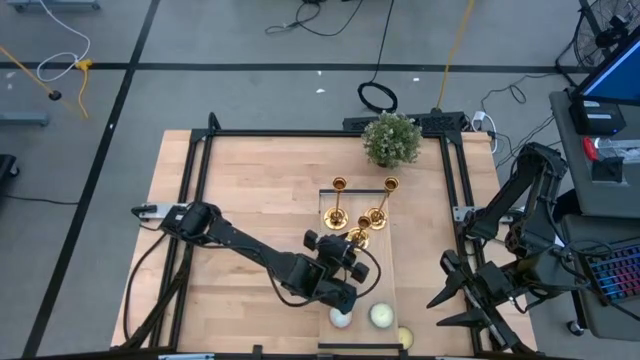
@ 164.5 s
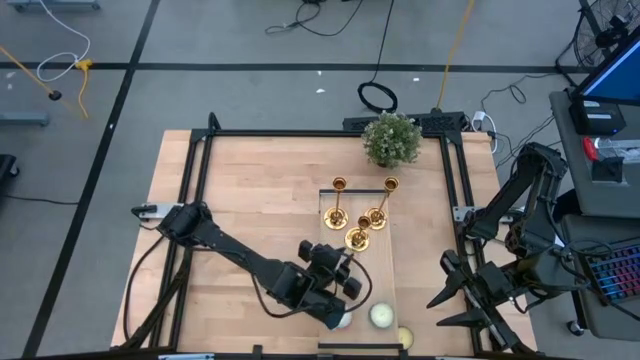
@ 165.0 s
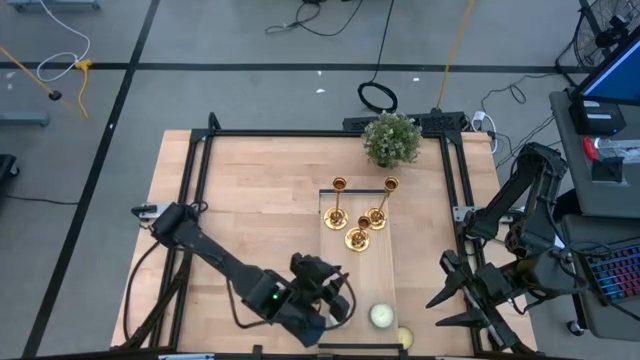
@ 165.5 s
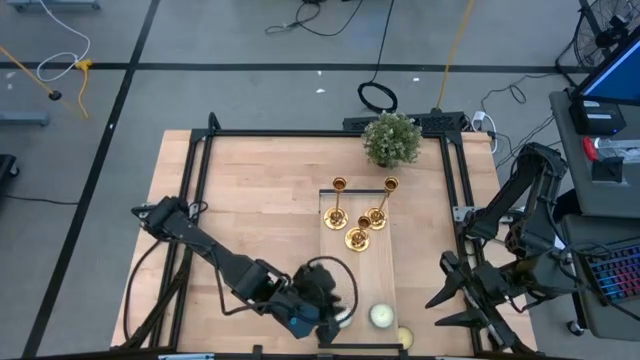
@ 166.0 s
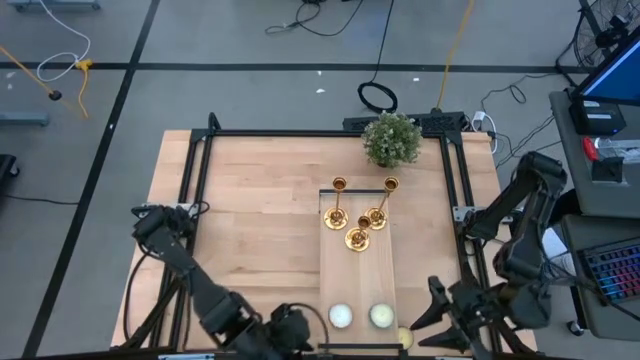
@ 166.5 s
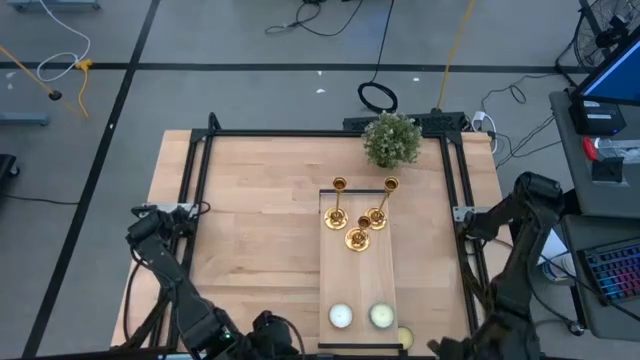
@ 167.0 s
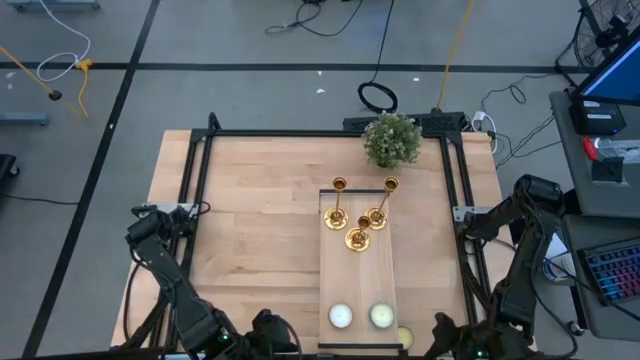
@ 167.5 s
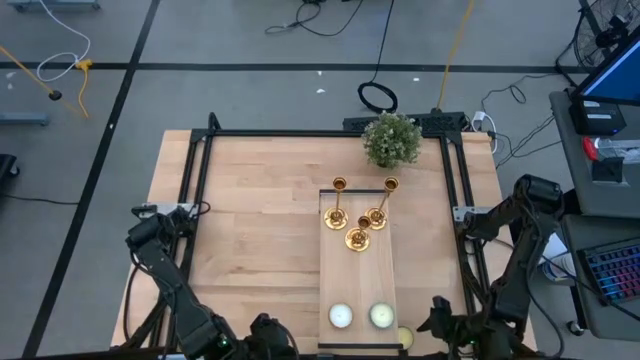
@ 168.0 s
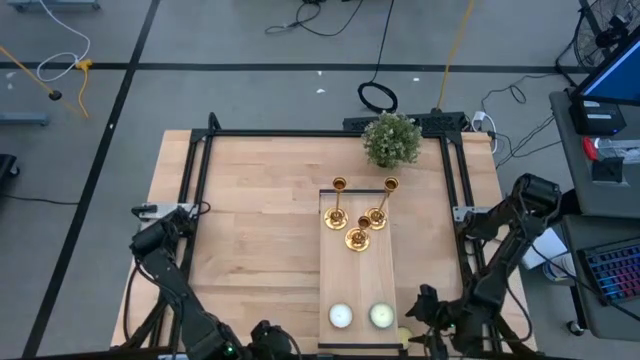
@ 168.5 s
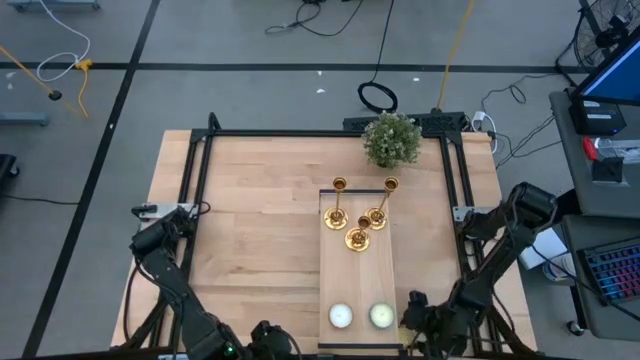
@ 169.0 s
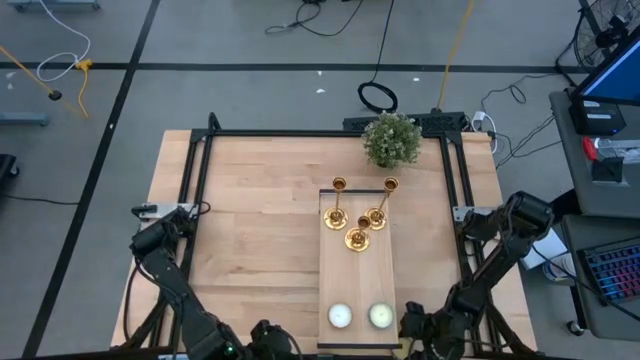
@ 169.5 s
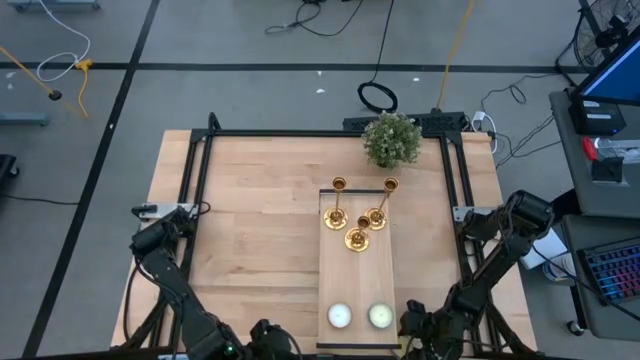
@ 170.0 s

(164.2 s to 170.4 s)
Task: Pick & Place candle stick holders
Put the red patterned scented candle on the shelf

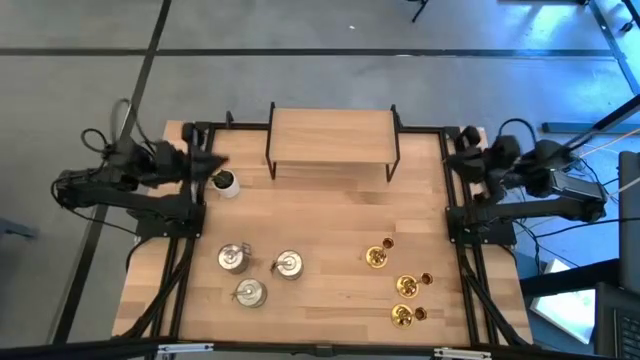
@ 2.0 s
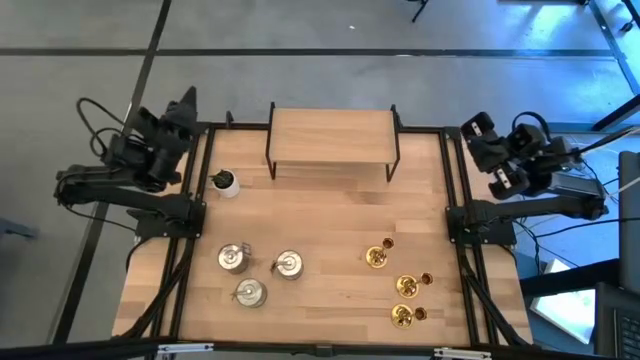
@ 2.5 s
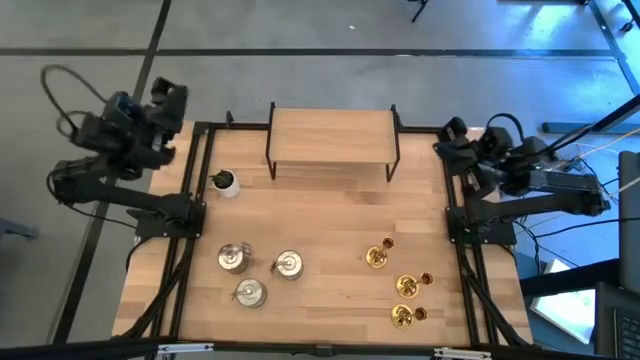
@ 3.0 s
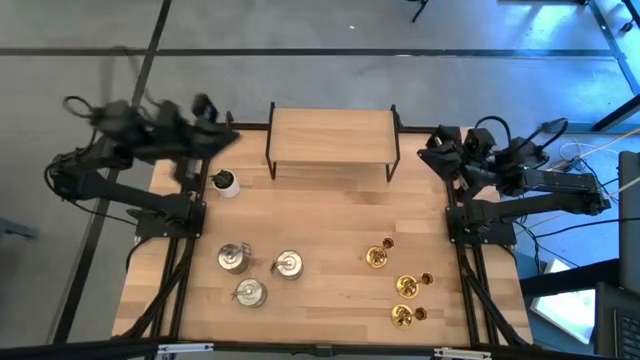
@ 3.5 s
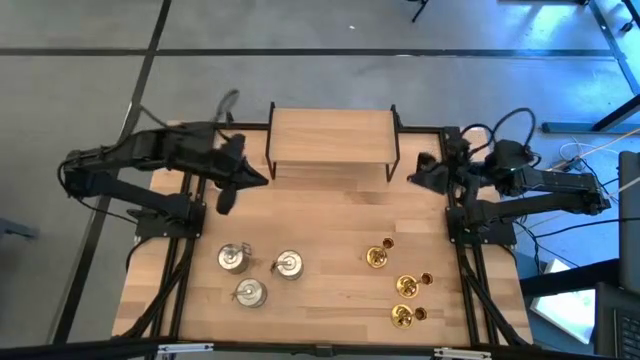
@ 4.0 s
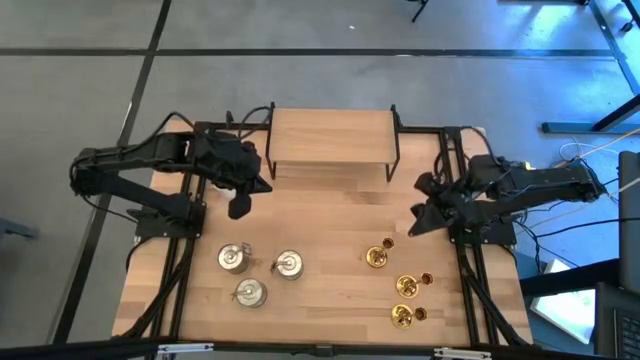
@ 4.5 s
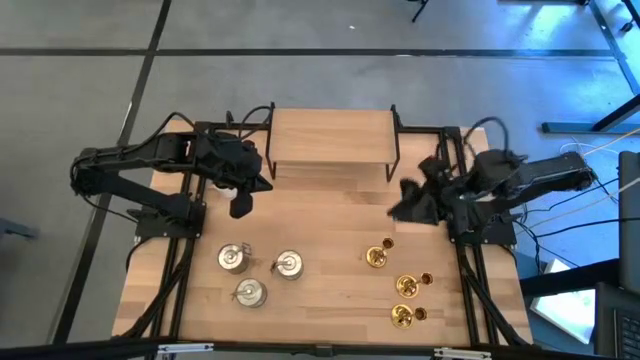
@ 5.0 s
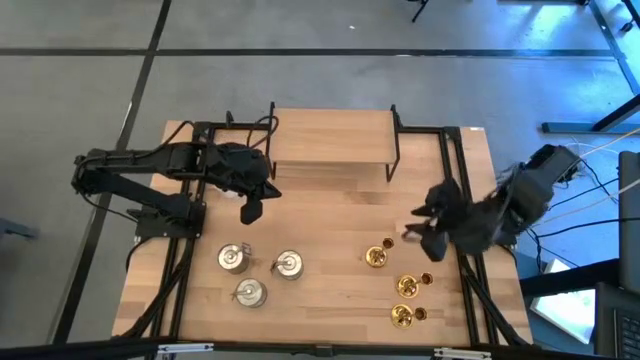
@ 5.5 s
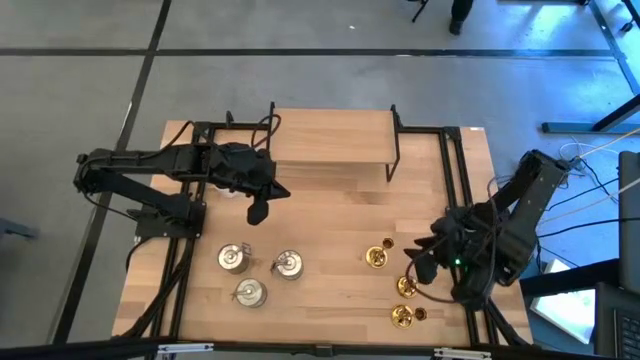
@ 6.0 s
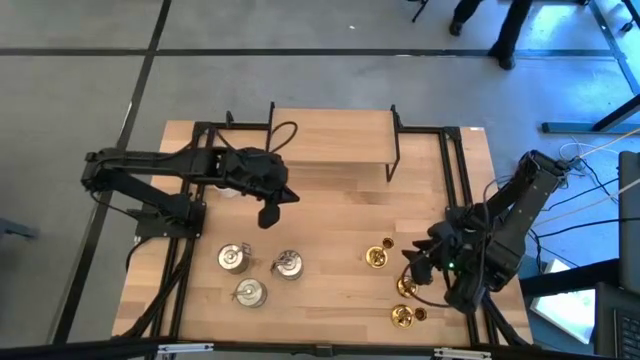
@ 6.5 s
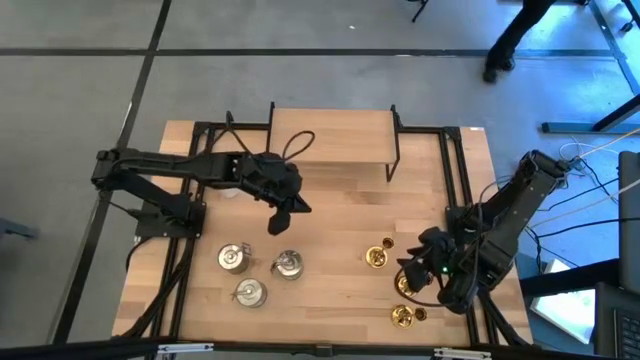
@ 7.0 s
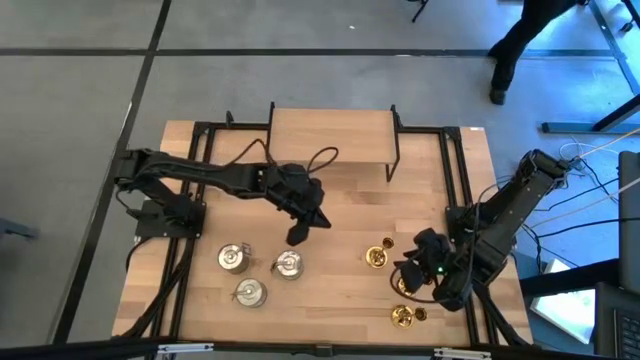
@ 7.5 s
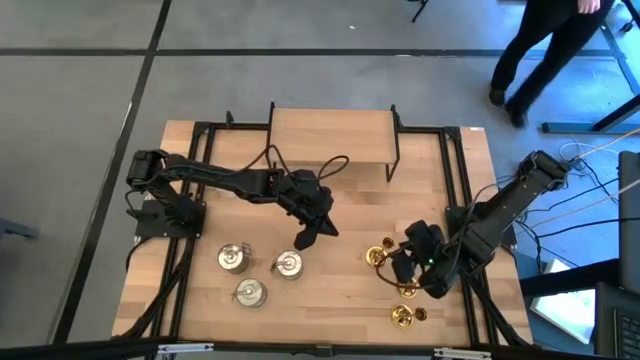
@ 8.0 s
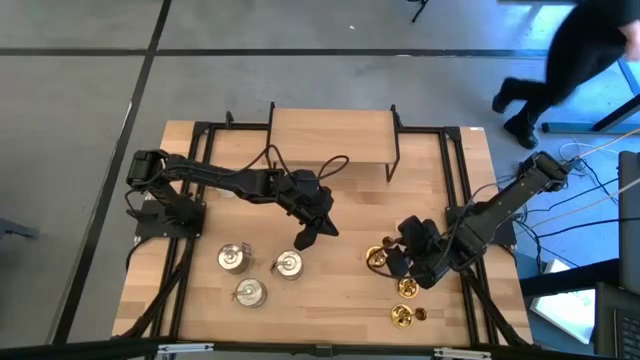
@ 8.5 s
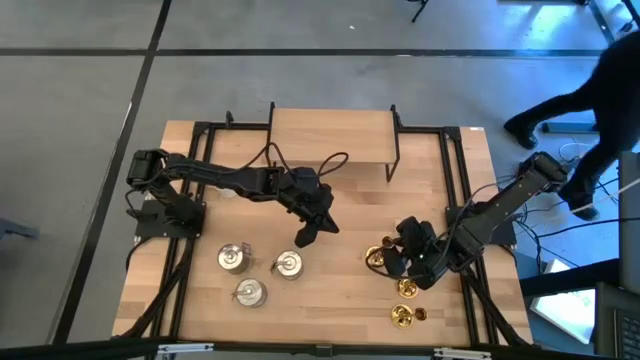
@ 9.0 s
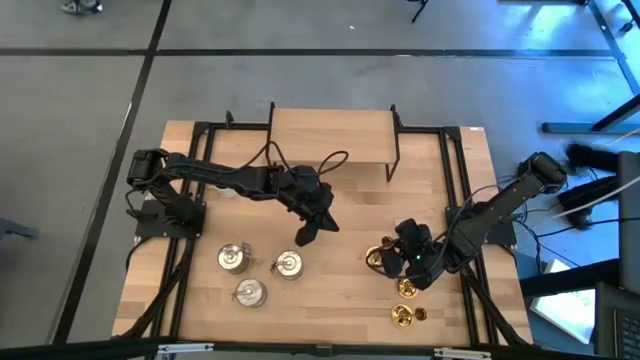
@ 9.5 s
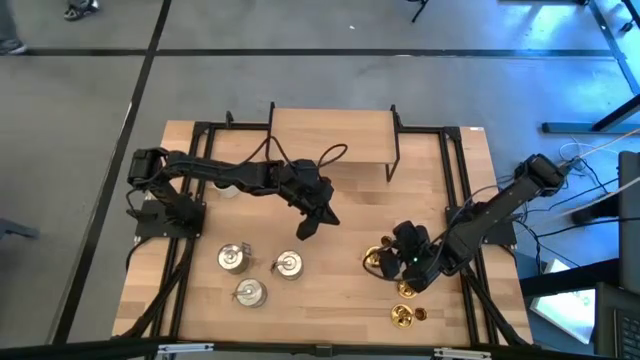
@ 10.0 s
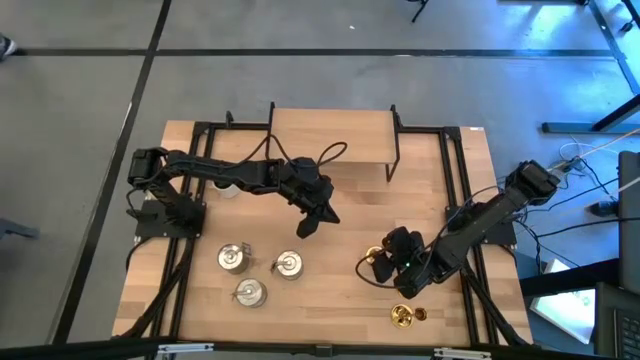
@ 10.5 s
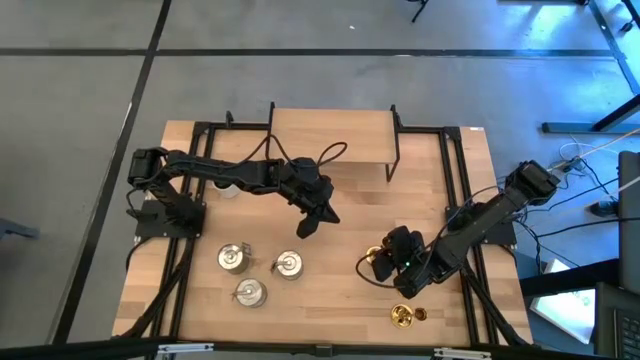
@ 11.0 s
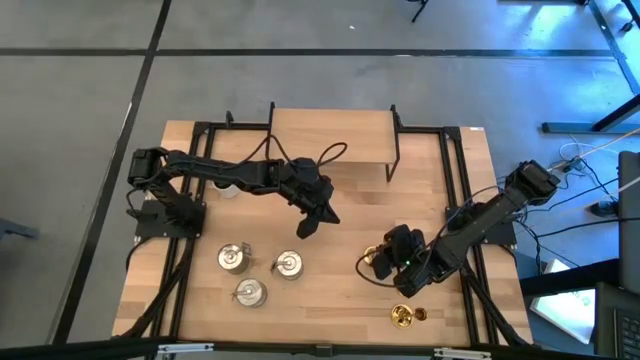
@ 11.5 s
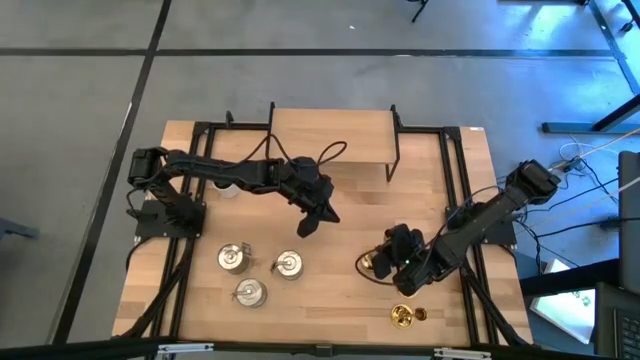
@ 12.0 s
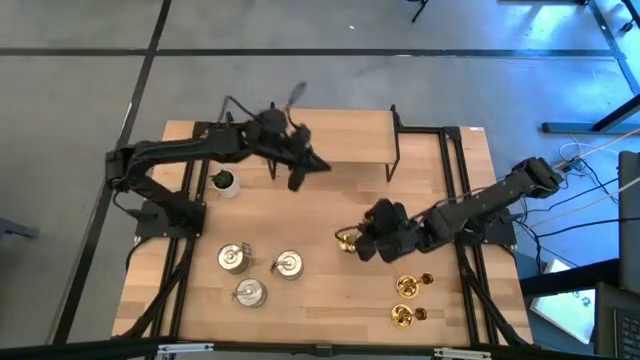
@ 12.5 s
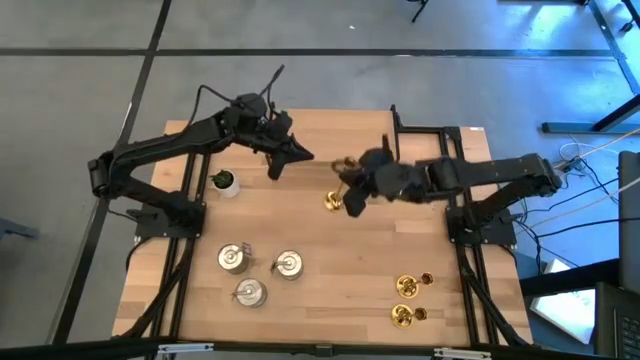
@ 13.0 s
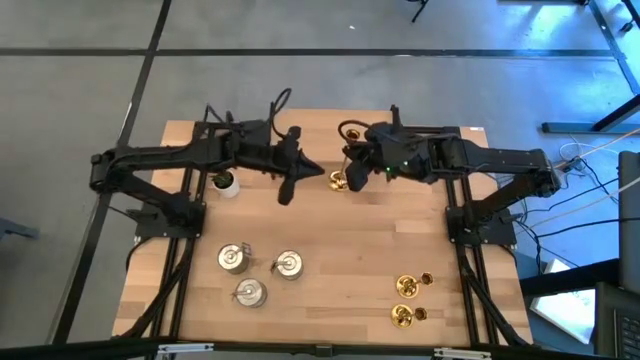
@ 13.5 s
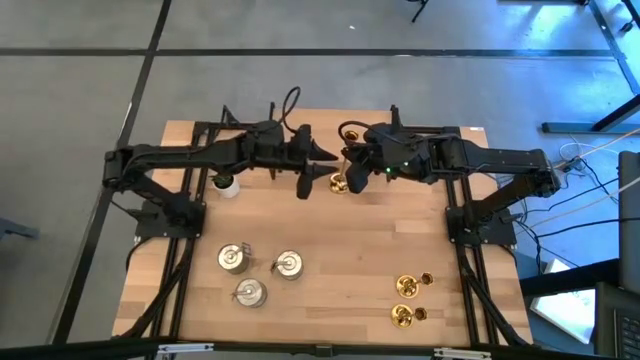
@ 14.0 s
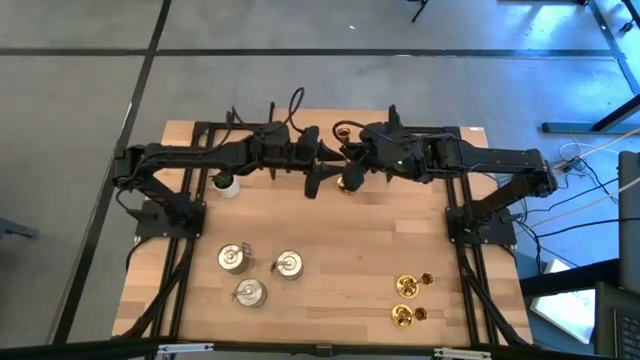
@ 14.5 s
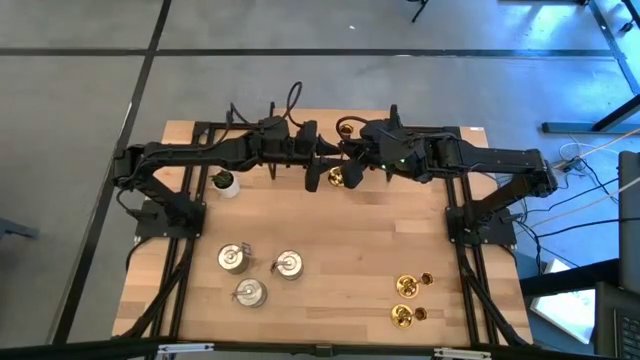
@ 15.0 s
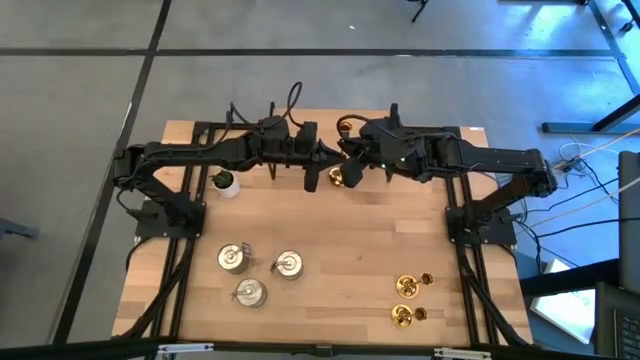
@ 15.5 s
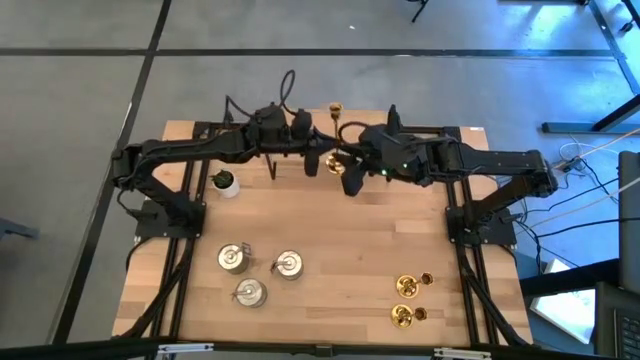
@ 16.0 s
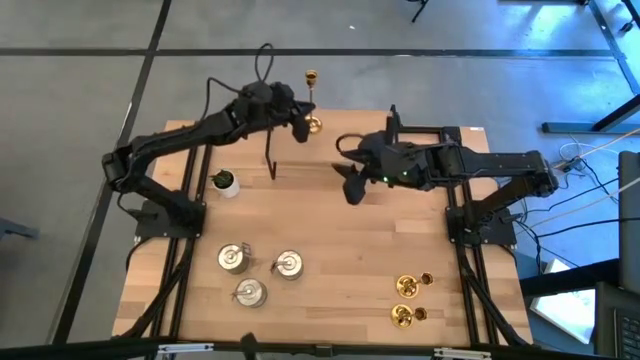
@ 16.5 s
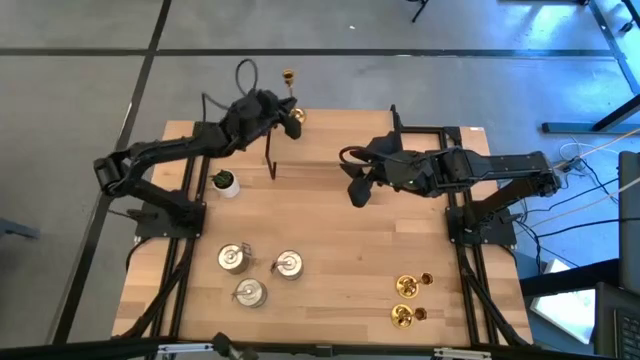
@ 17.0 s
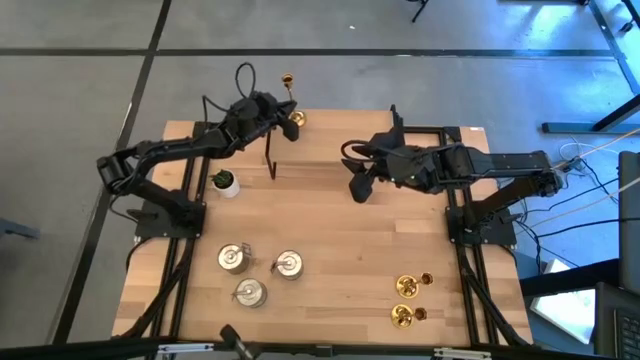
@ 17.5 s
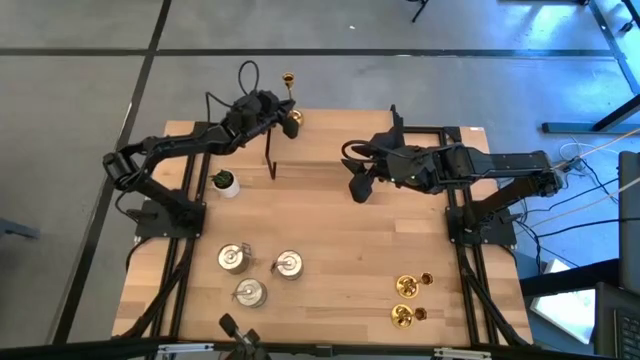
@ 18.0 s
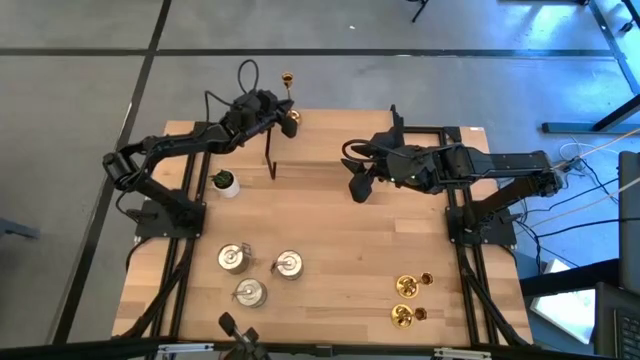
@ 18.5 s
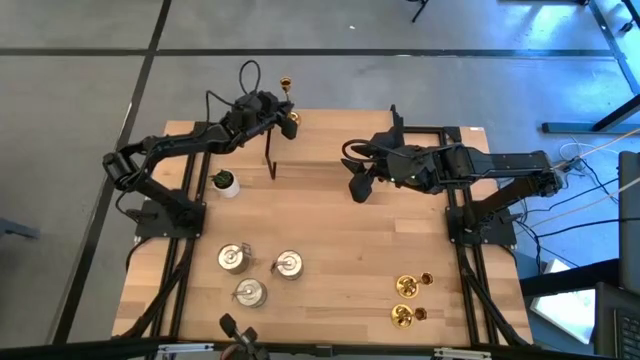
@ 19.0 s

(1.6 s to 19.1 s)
Task: Pick & Place candle stick holders
Put the top gold candle holder on the shelf
